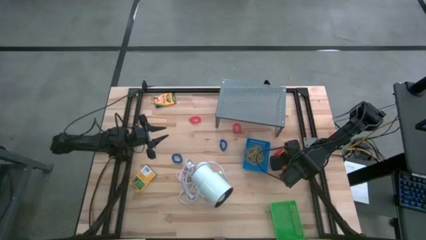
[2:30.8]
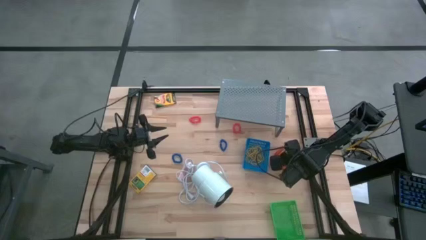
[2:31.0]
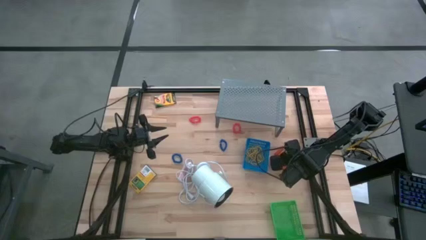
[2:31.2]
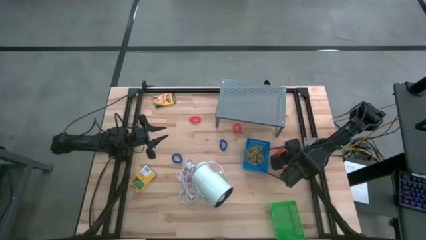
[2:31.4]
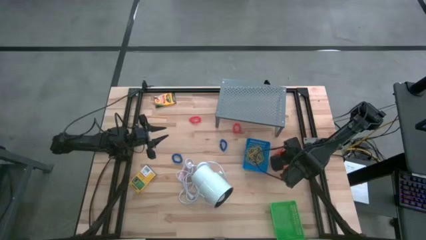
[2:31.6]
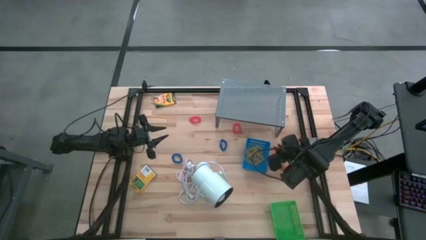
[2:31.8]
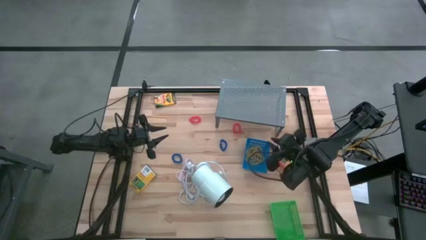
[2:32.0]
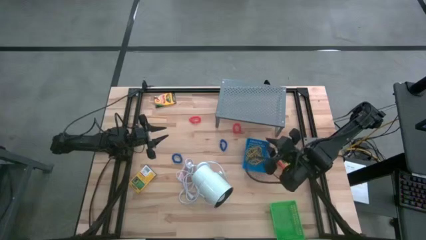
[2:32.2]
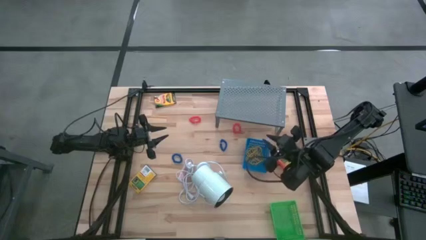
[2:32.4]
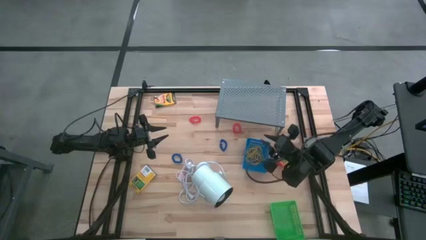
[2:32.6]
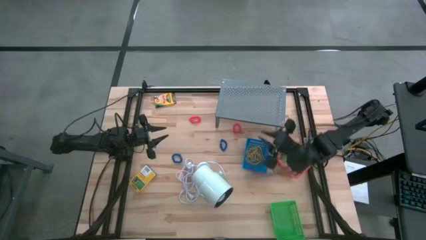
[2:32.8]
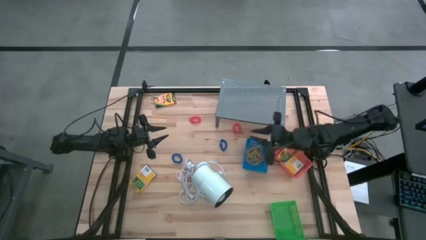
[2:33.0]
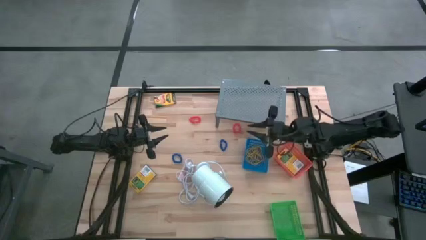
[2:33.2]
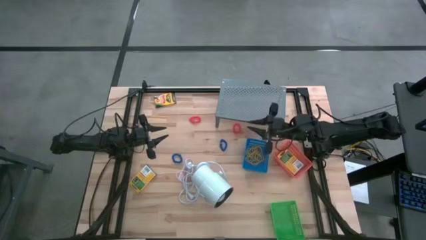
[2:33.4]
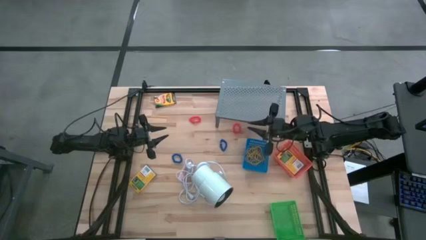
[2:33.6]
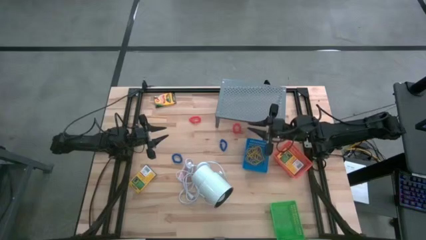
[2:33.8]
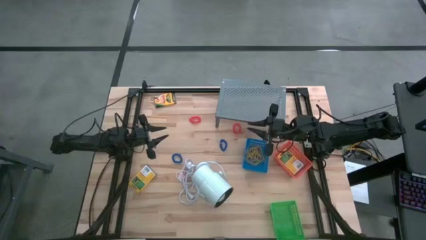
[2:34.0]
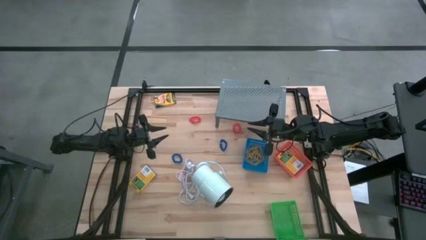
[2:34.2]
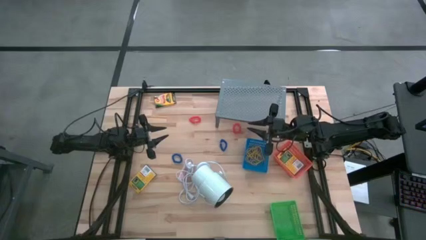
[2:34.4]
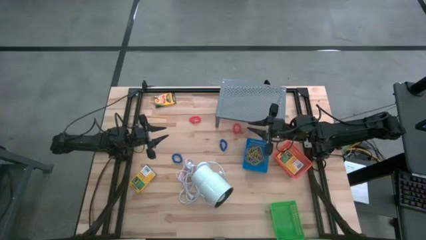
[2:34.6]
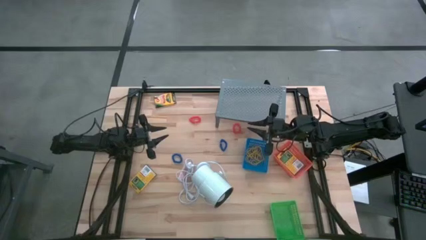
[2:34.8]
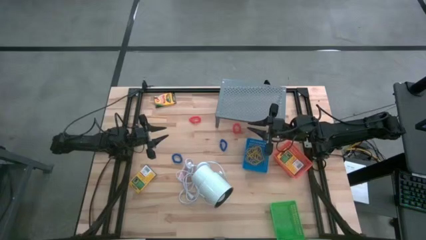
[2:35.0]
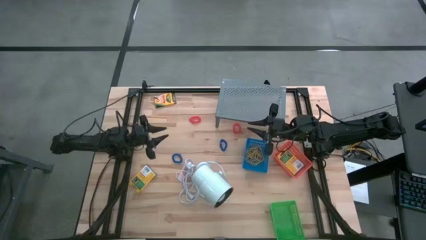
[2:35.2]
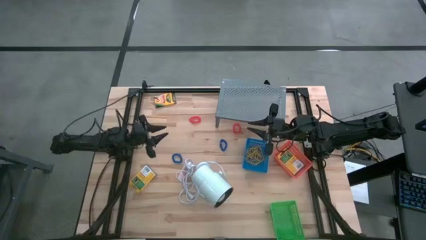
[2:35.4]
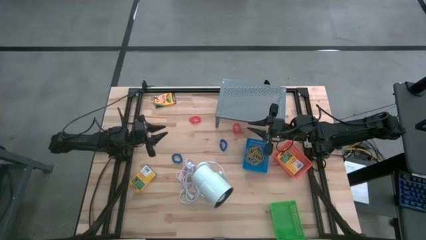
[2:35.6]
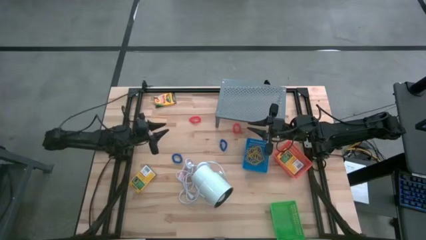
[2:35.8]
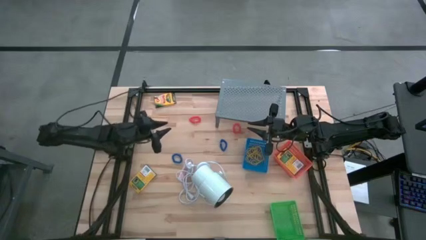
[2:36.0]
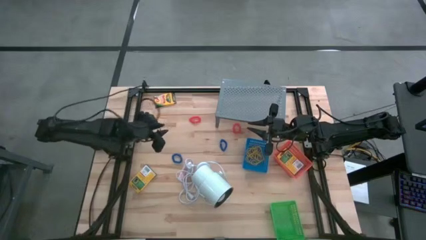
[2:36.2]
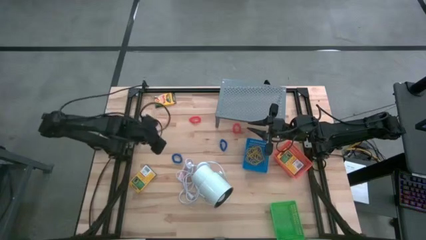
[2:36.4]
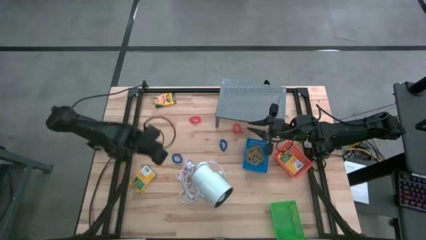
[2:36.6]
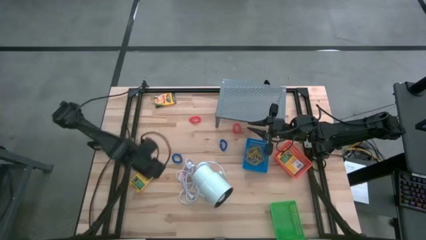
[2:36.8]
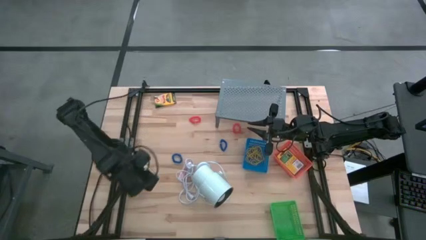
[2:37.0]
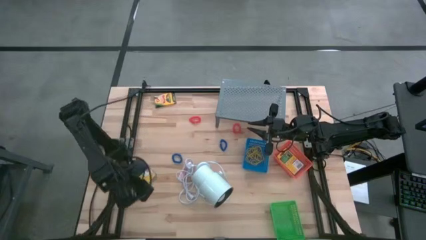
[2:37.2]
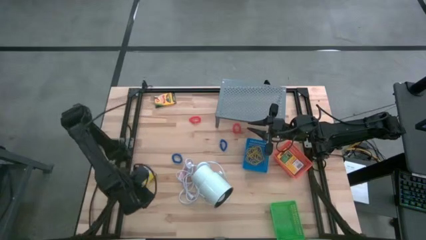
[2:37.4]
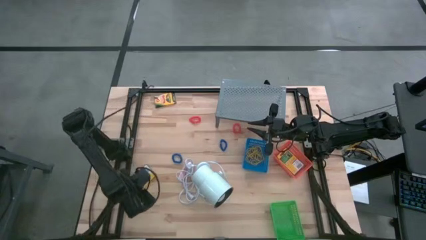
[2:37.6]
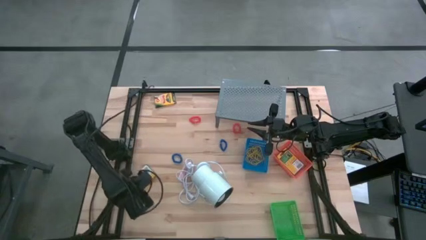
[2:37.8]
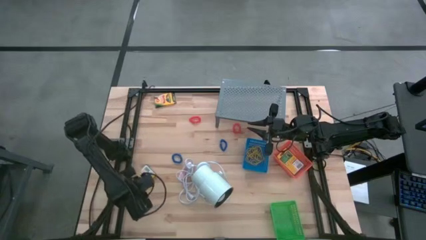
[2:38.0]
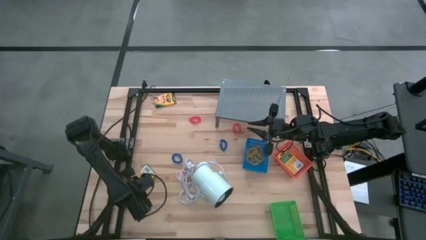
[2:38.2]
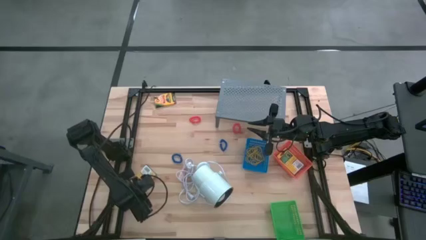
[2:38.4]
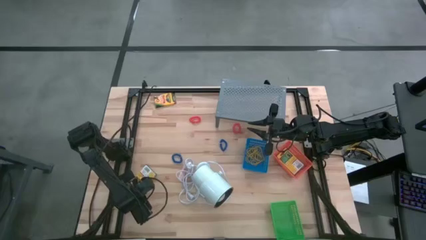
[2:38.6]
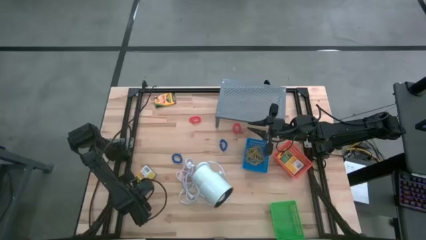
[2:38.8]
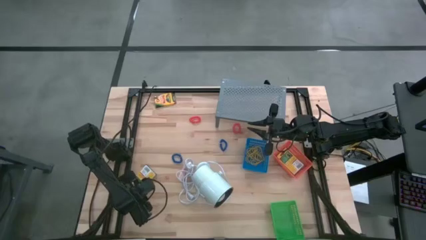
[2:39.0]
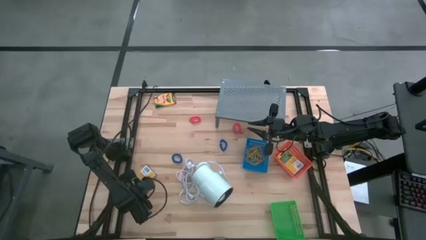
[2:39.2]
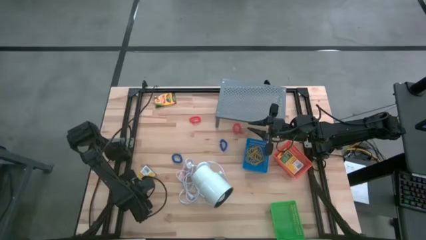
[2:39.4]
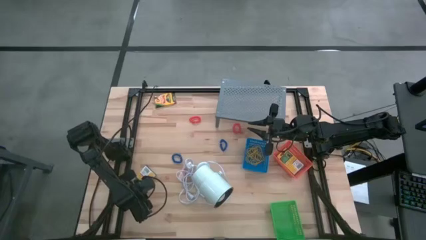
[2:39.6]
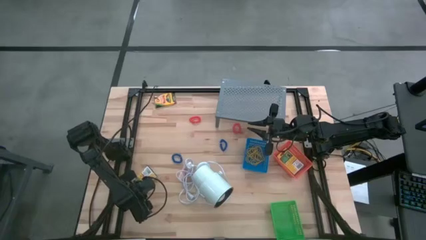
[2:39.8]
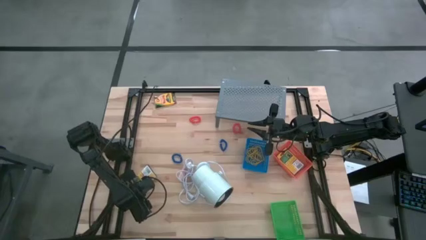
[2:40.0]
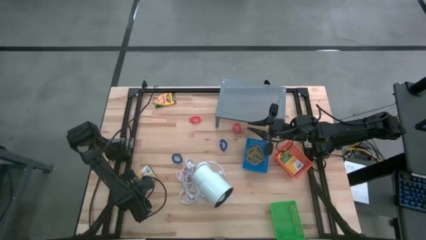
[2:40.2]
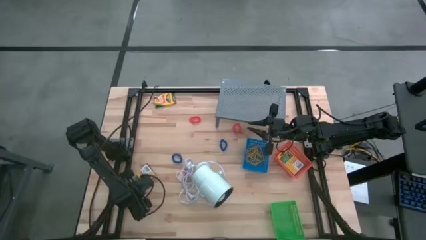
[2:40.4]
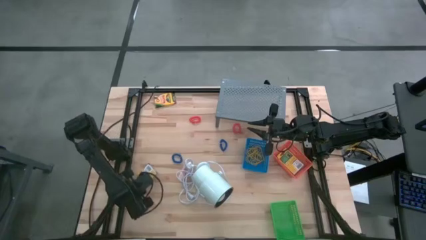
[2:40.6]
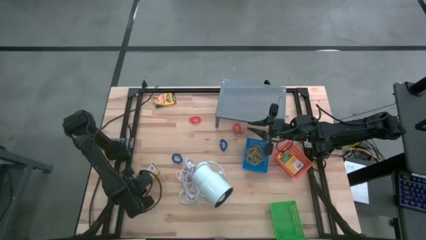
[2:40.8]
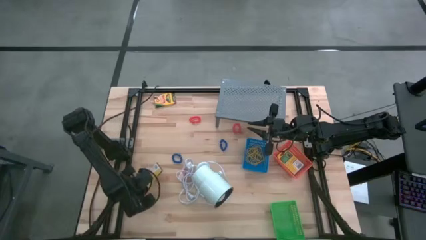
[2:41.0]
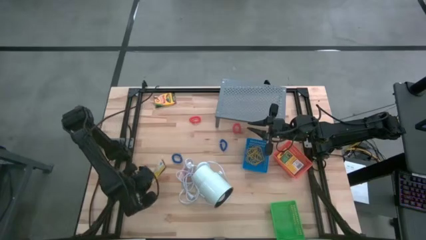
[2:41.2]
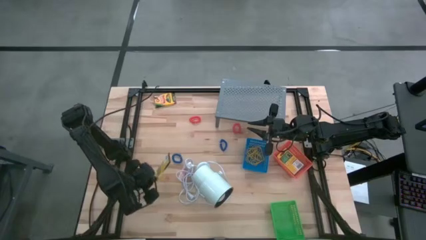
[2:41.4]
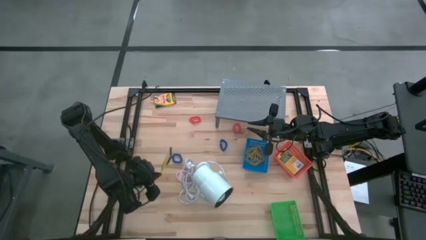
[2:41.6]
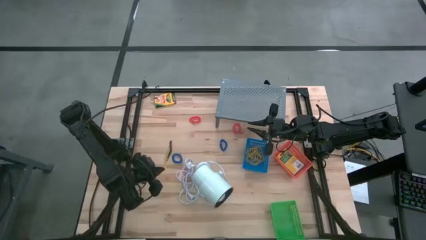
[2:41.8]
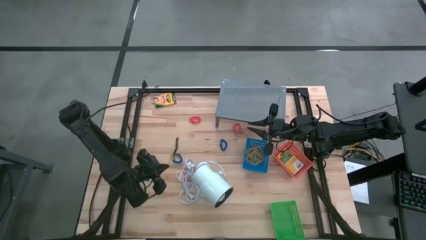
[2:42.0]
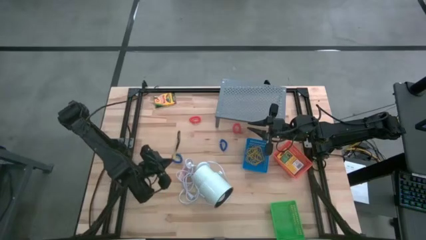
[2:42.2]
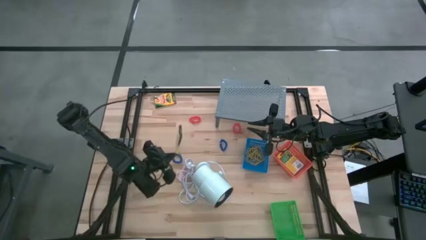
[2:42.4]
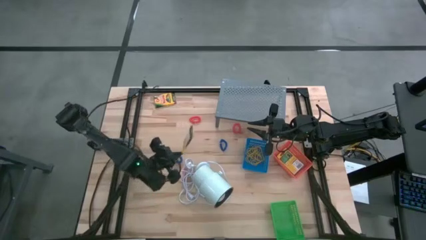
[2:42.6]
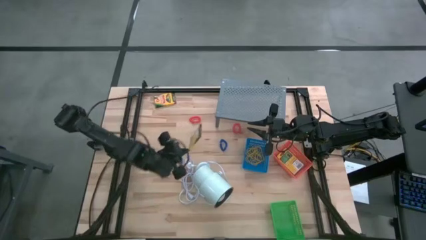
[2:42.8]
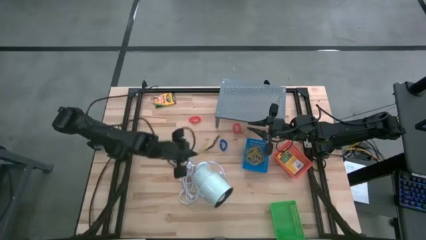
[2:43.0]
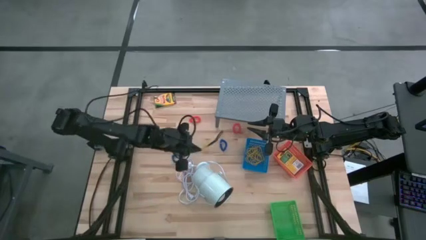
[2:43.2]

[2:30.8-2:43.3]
Task: Pick & Place Office Desk Supplies
Put the yellow box of crayons into the orange bin

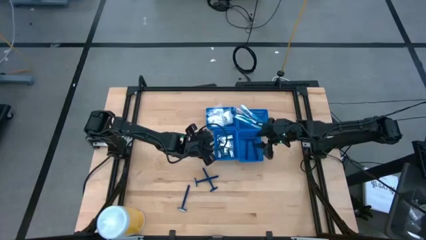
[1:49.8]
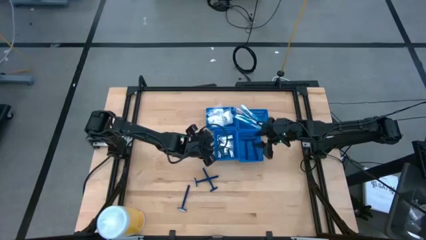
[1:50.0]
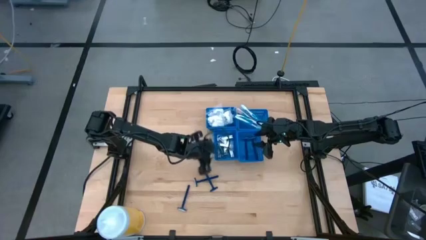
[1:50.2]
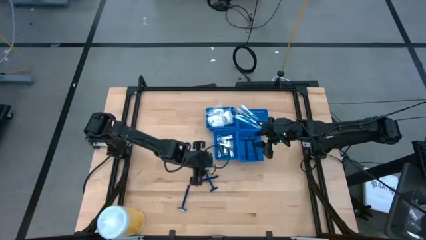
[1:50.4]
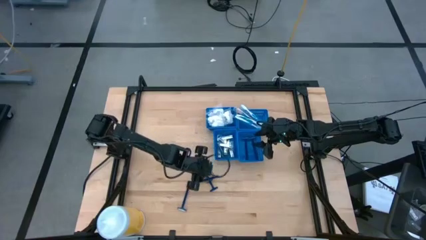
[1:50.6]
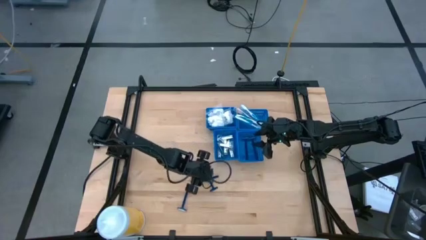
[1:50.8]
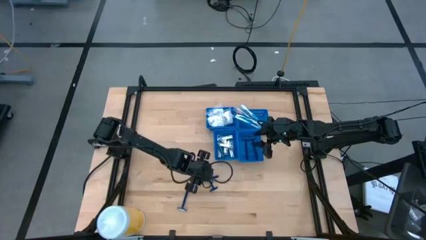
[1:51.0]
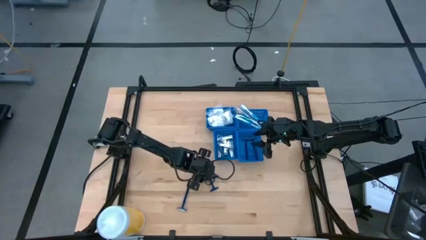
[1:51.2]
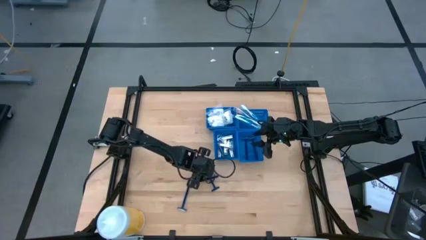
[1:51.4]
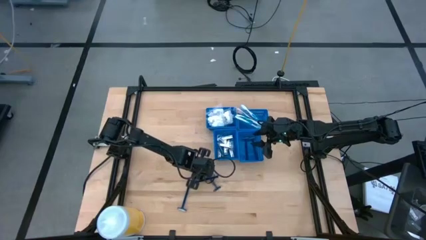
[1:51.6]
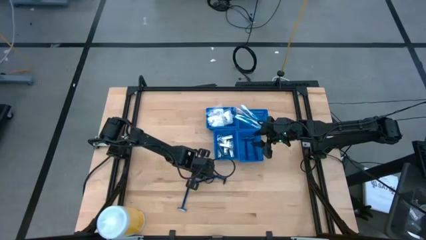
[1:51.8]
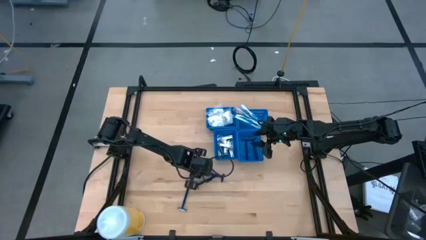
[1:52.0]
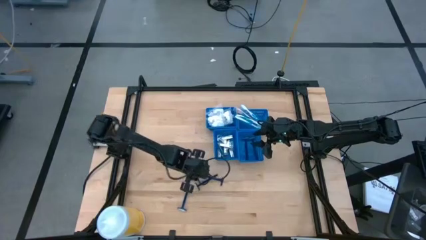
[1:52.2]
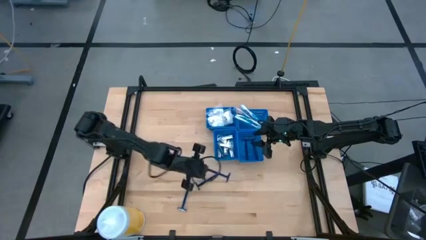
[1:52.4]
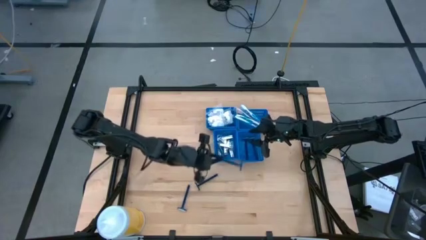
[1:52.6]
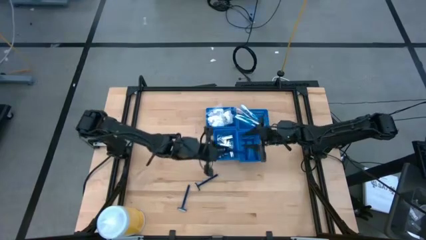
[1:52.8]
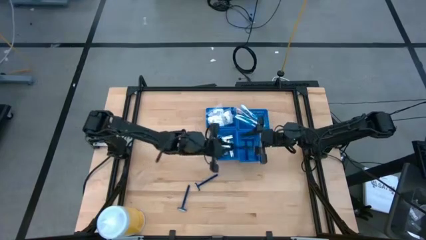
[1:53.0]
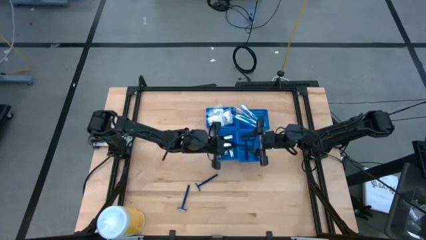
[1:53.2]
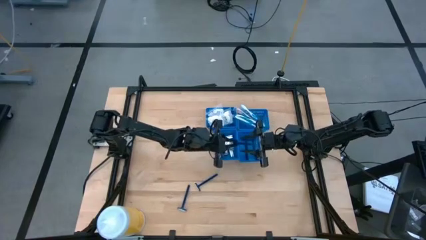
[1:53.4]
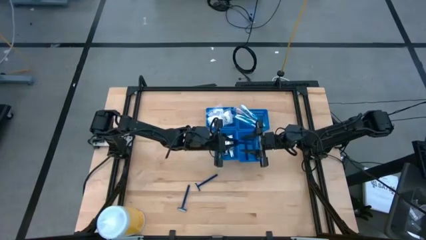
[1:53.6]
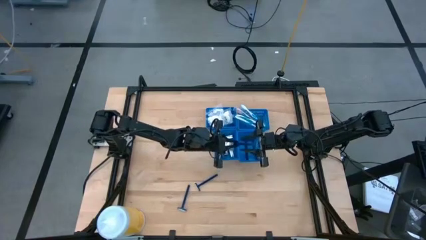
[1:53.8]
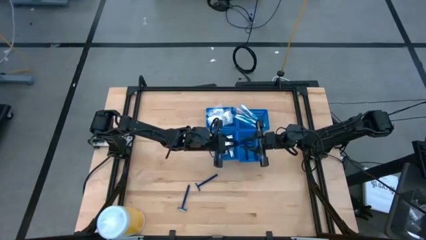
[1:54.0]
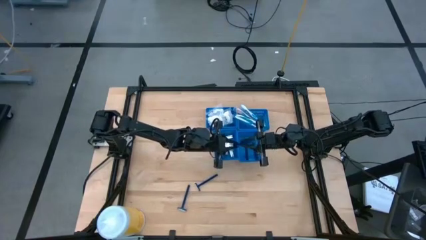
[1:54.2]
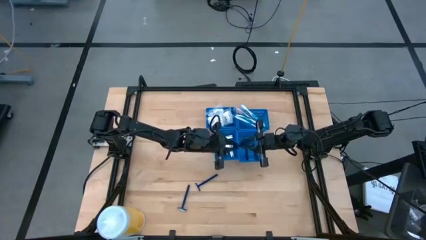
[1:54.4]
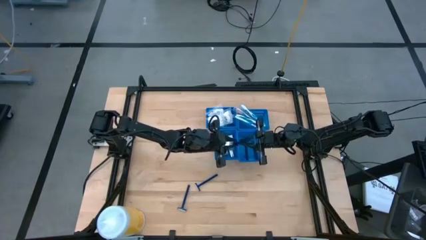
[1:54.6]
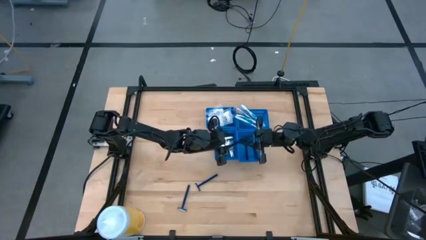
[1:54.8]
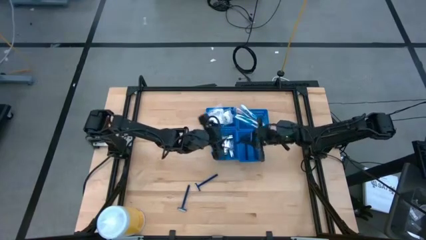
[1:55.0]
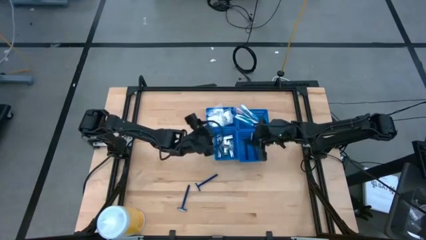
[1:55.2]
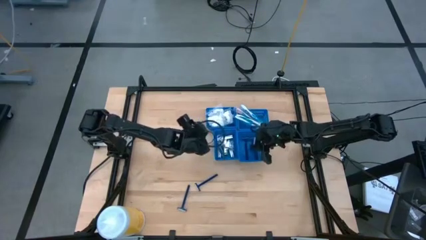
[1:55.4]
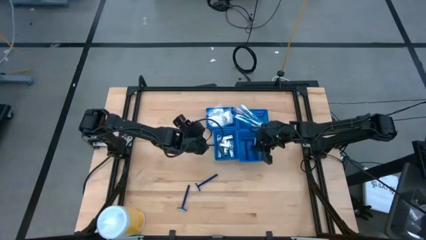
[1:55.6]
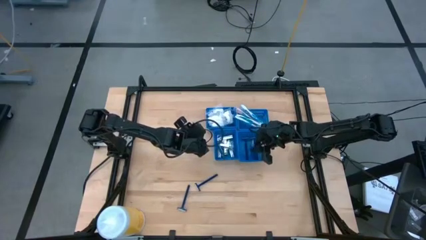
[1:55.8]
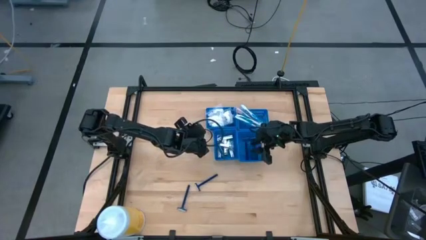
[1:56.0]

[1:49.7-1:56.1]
Task: Pick & Place Travel size toiletries
Put the blue razor into the bottom right blue basket
